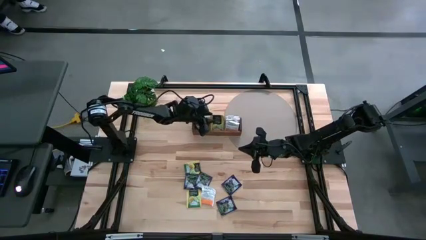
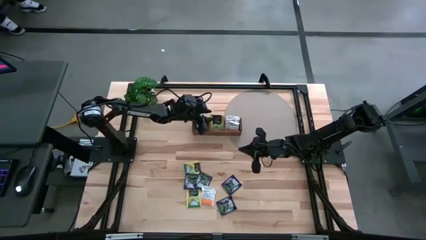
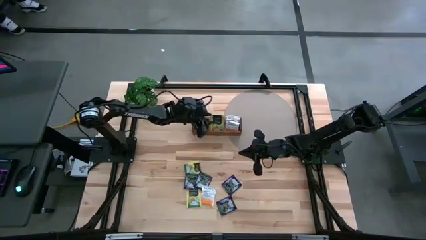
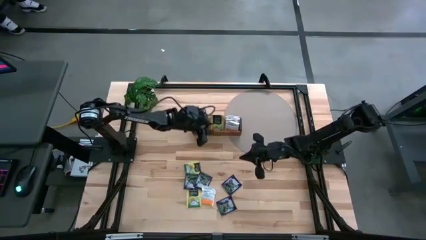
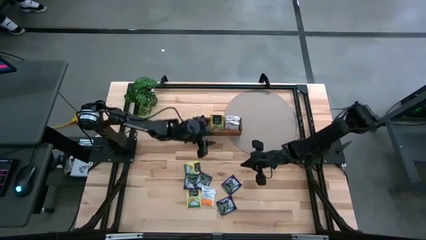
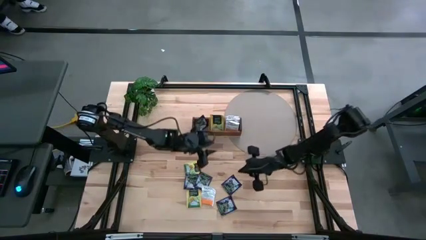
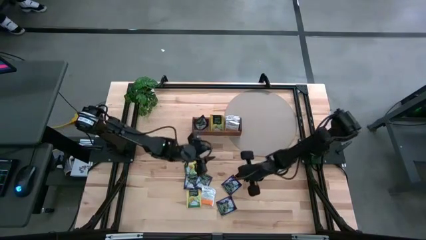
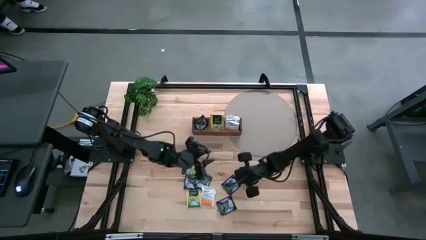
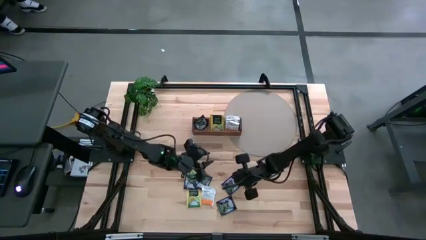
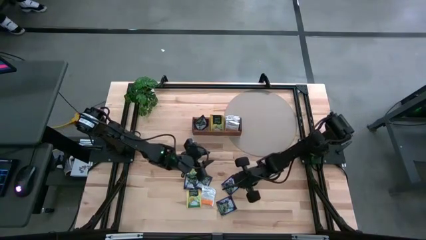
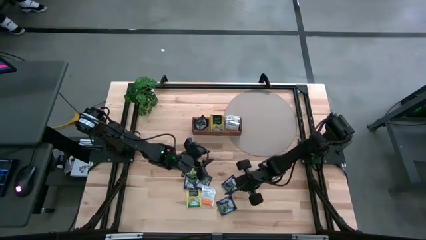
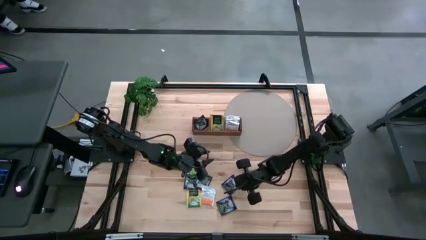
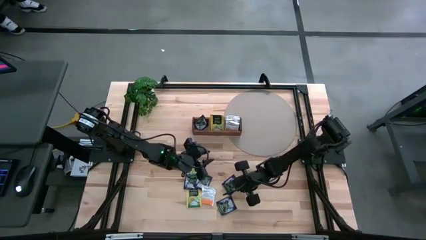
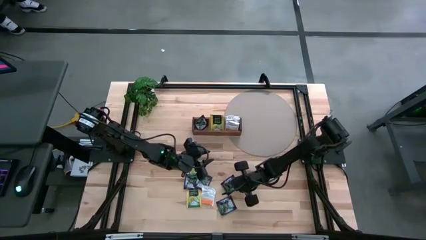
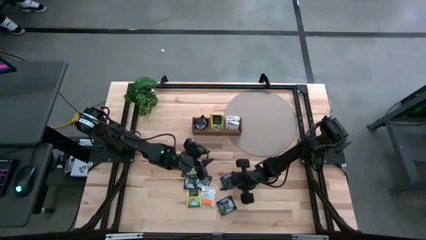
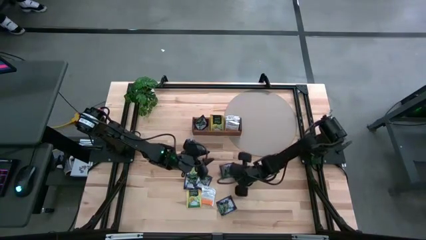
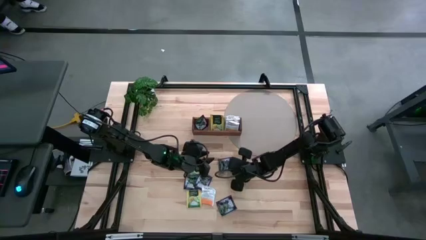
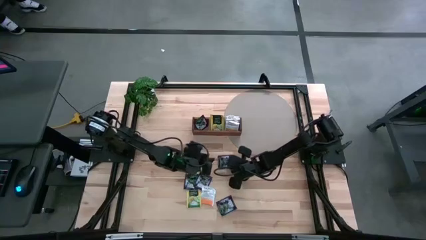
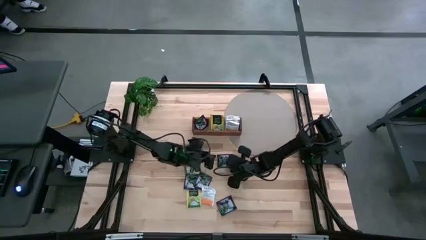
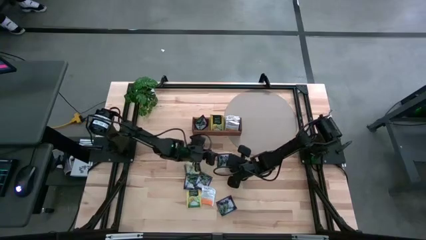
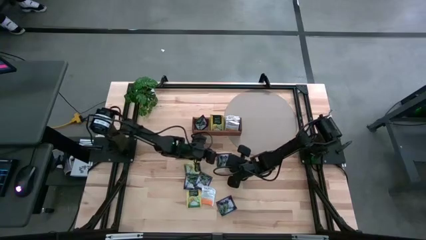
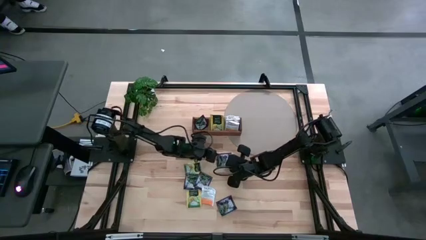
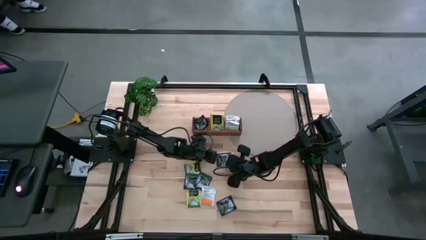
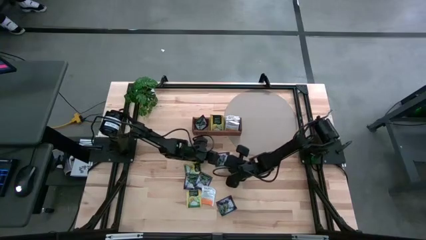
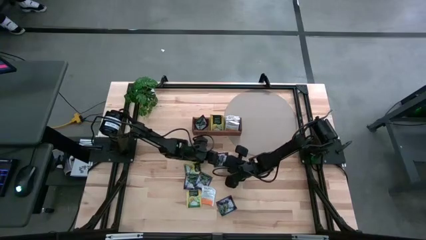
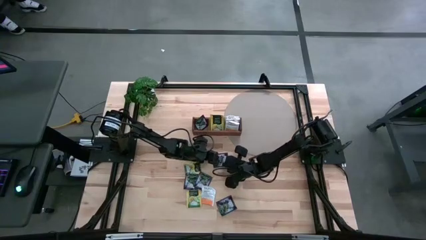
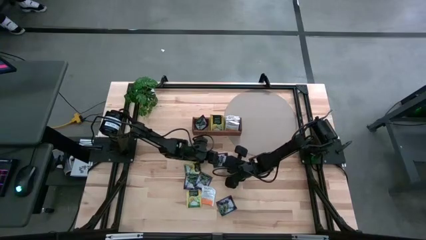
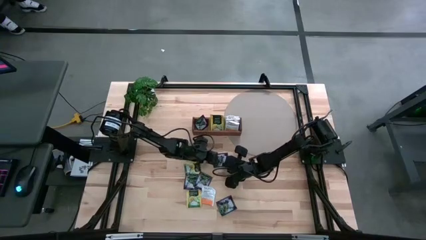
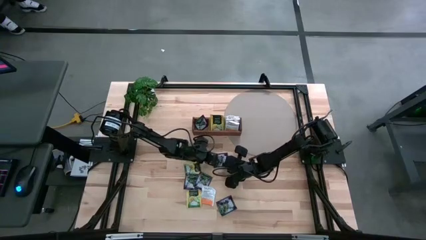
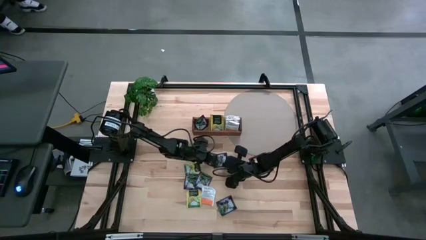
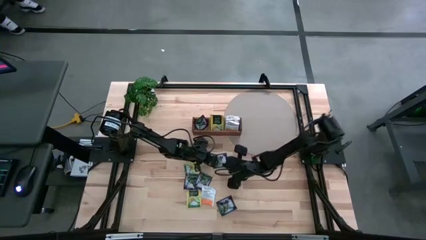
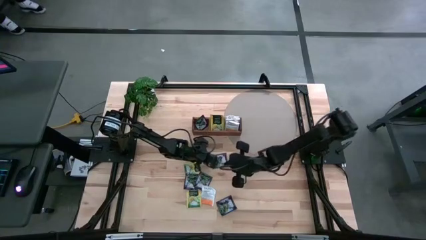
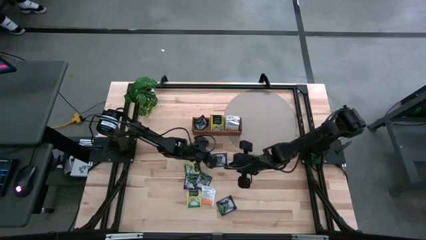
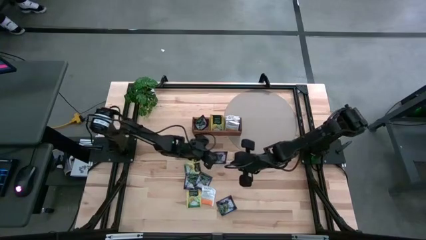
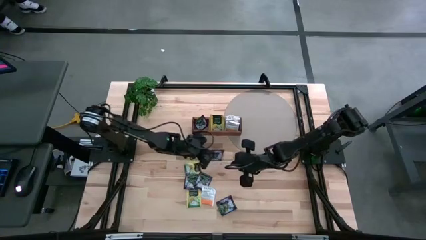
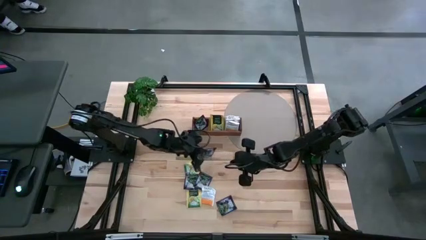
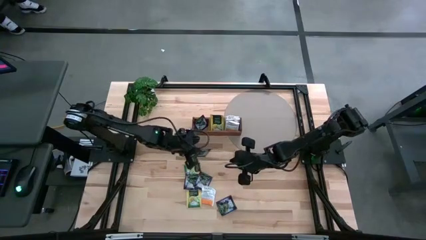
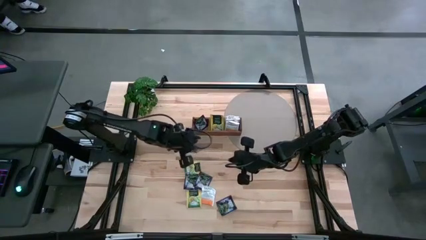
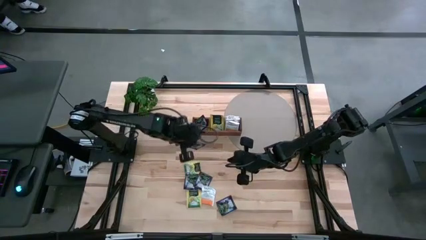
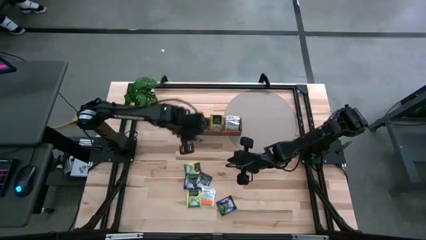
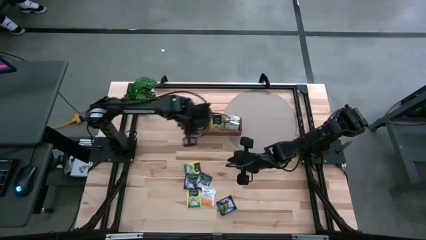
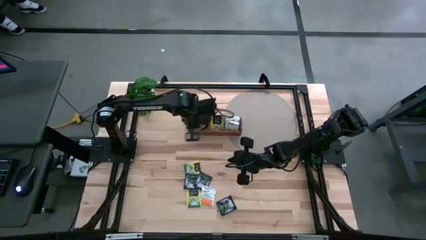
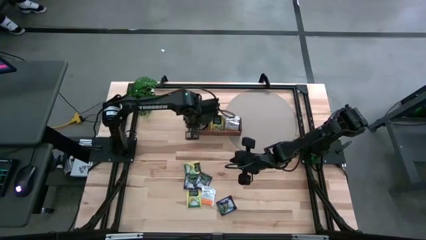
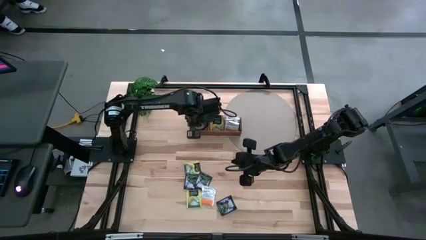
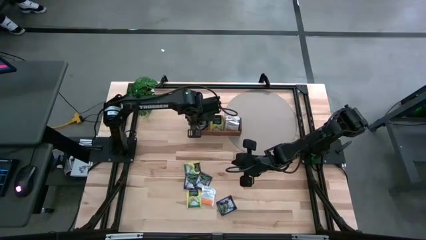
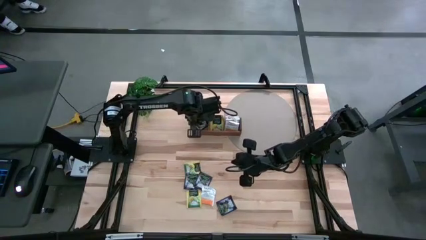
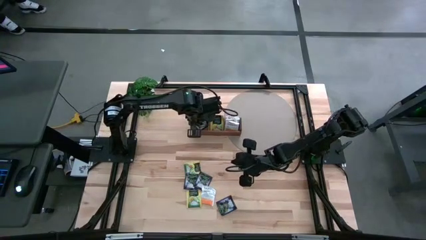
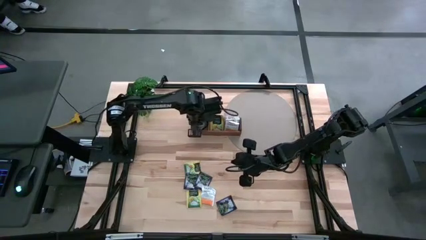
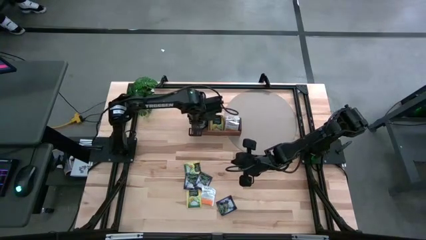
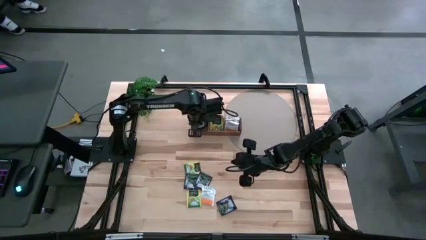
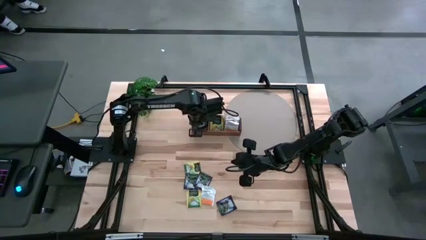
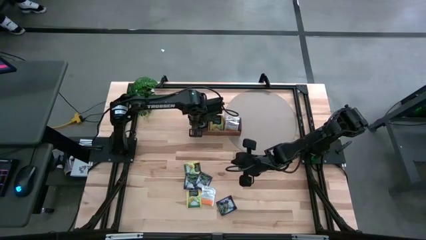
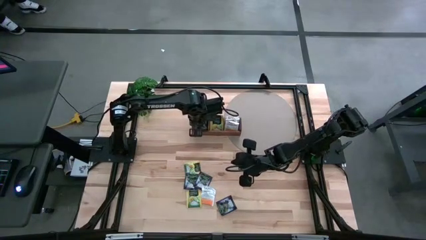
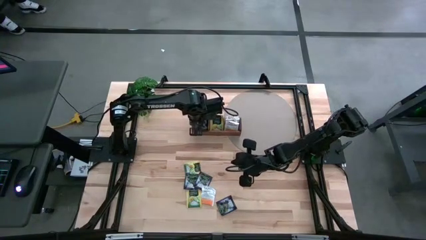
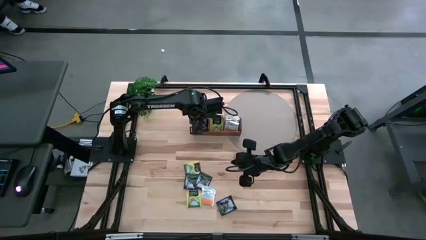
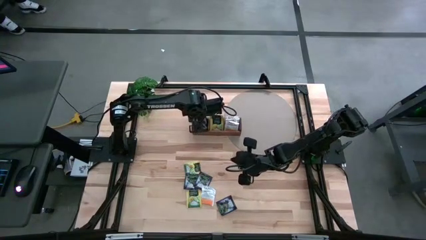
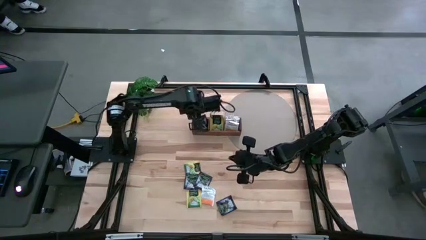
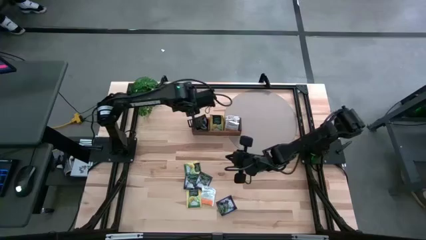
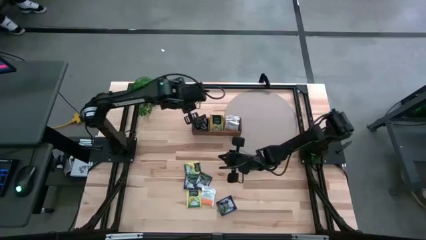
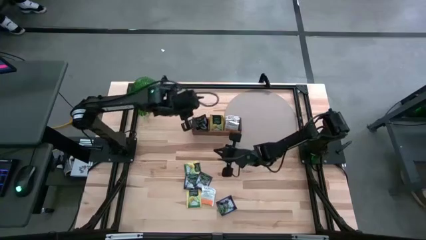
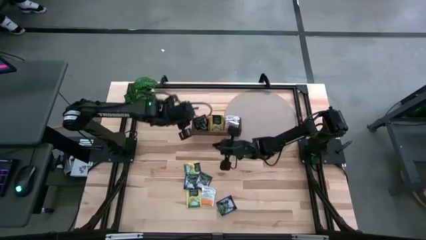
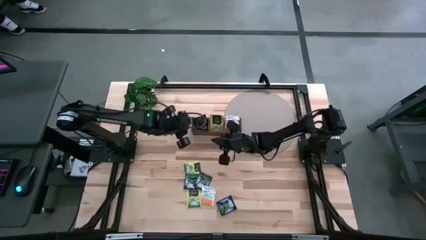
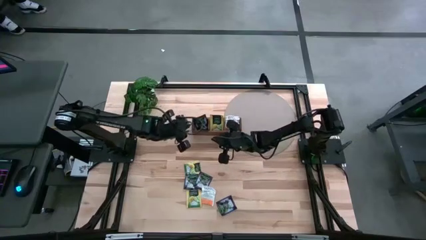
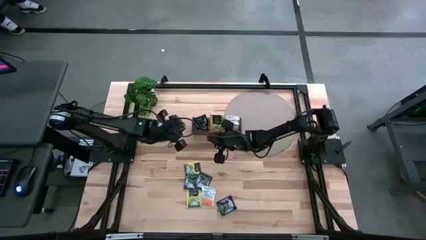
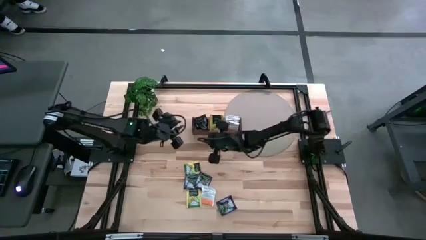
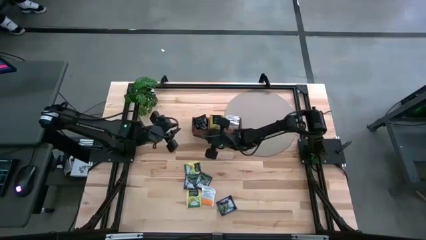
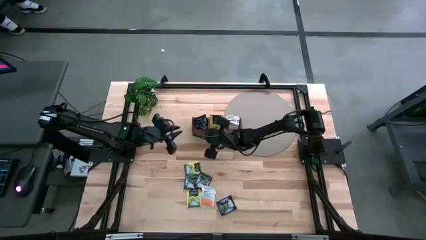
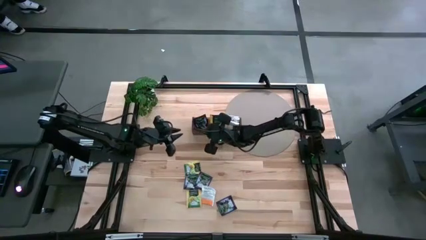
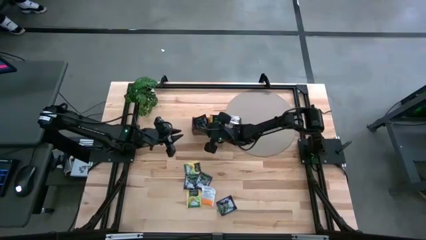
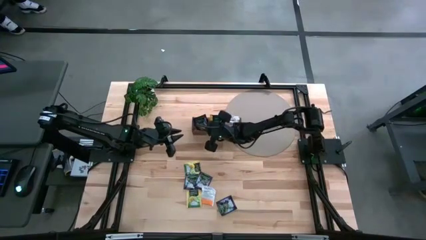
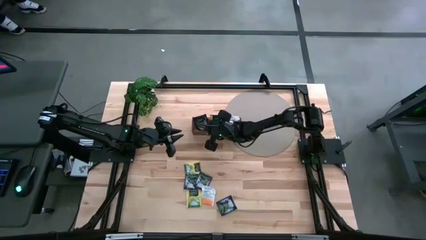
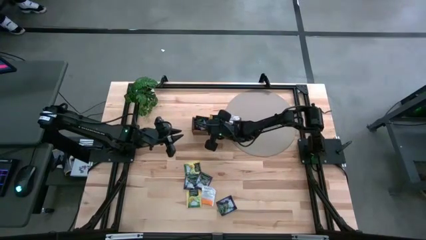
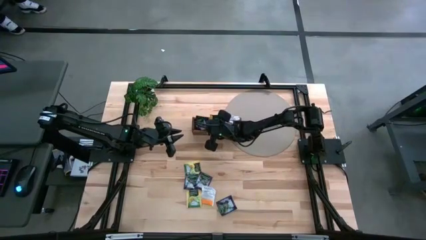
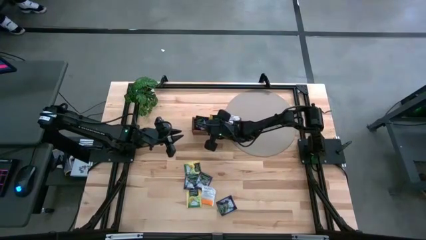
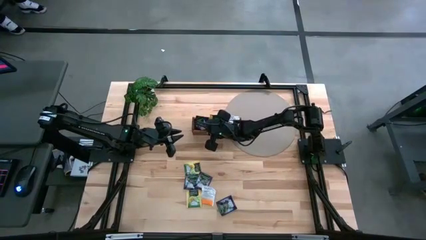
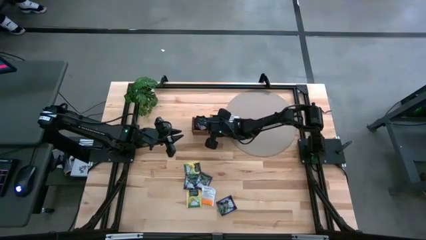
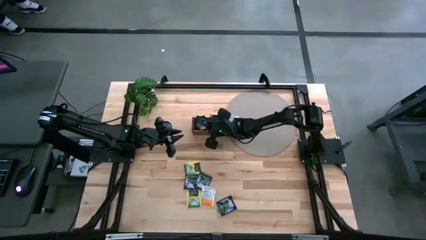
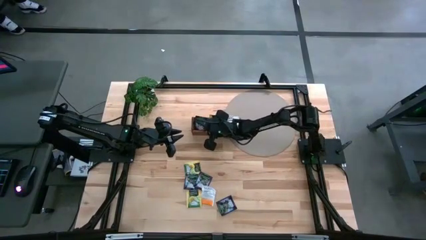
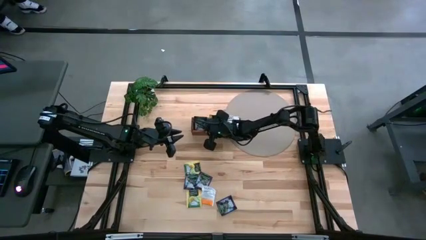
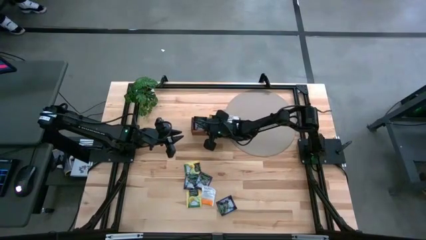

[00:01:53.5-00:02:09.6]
Task: Pick & Place Tea
Put the violet tea bag into the left section of the wooden organizer
